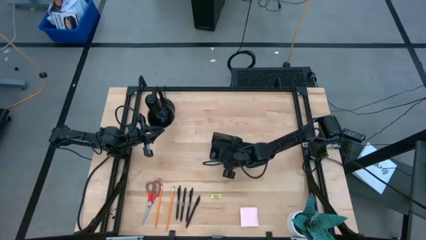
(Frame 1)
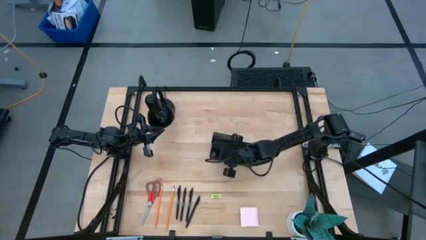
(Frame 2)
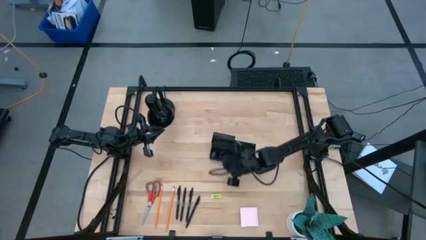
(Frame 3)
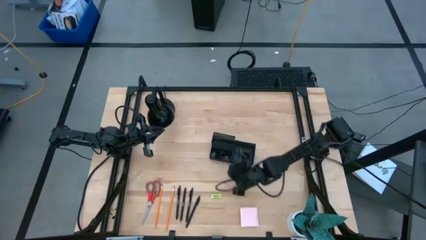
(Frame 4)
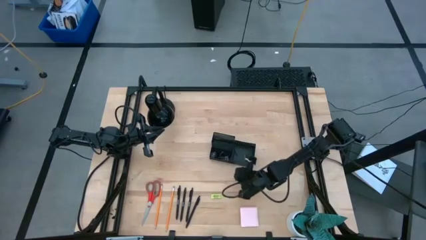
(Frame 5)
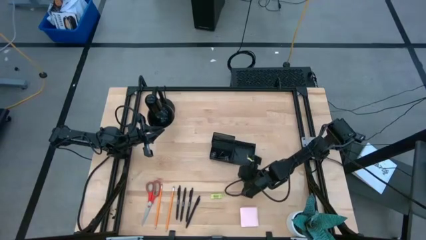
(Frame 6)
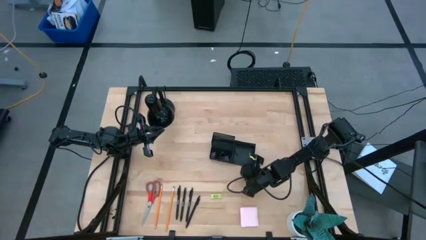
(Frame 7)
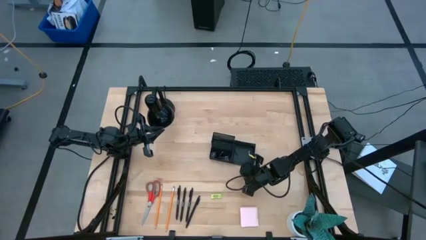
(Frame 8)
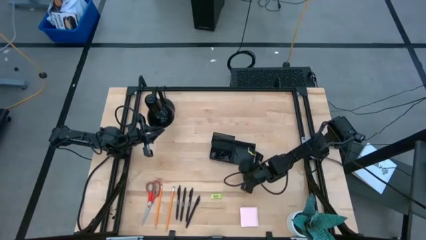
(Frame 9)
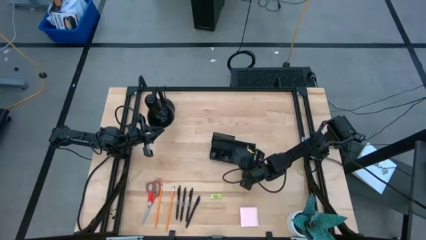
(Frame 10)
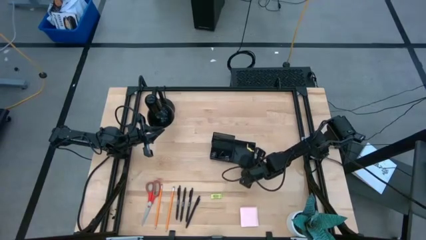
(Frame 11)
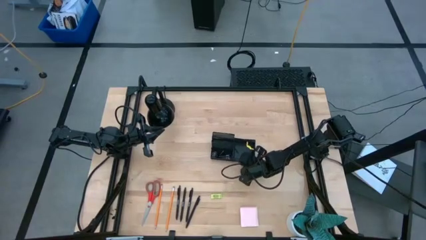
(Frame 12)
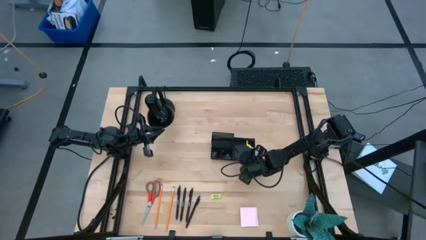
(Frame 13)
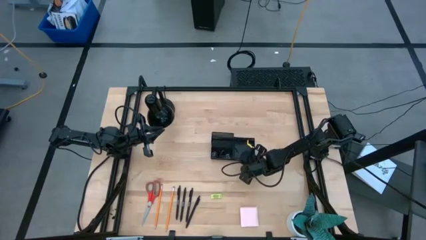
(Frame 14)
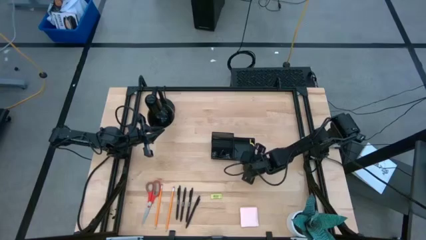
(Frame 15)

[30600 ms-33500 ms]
Task: Pick and place office supplies into organizer
Adjust the black desk organizer

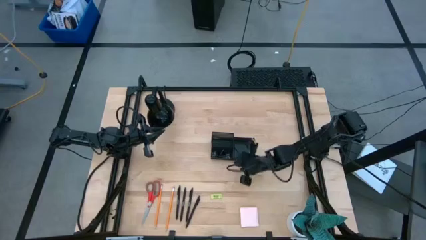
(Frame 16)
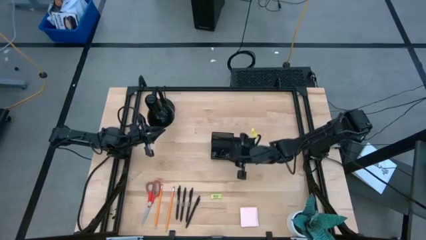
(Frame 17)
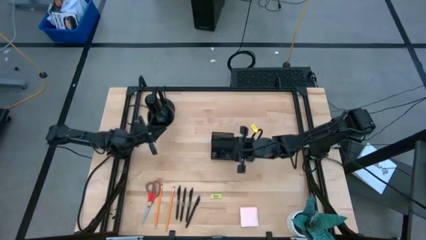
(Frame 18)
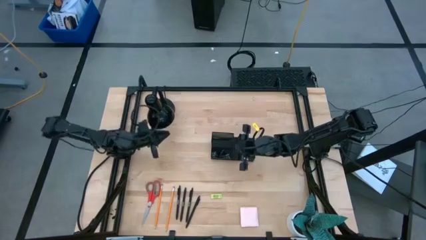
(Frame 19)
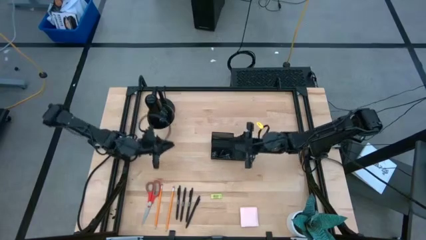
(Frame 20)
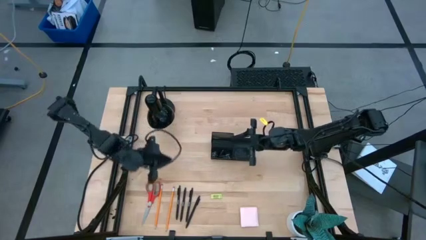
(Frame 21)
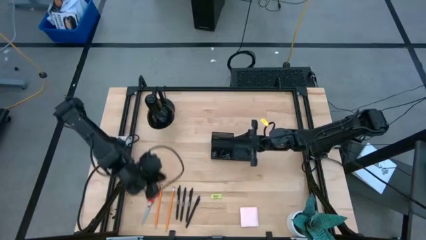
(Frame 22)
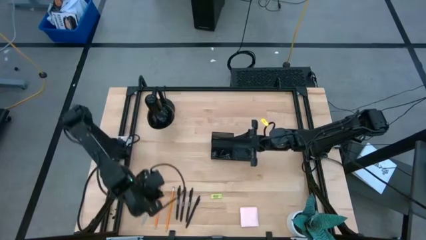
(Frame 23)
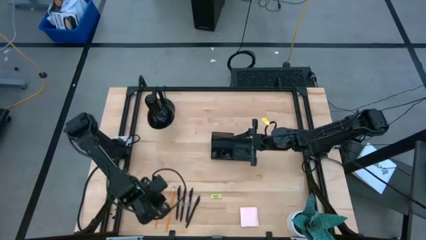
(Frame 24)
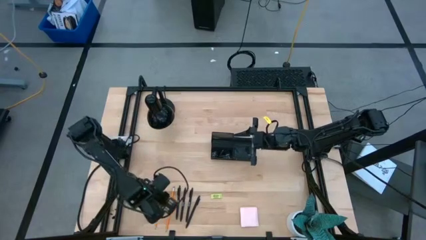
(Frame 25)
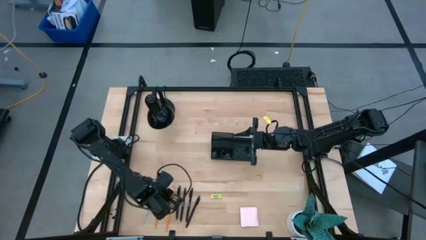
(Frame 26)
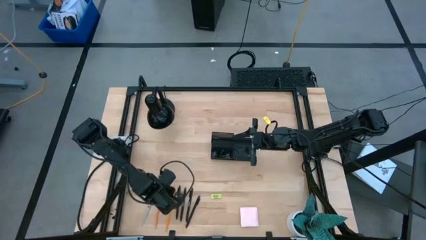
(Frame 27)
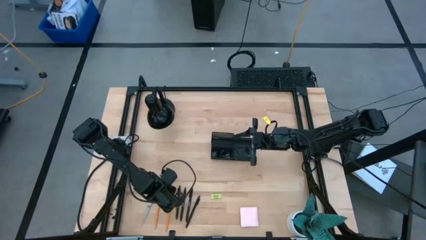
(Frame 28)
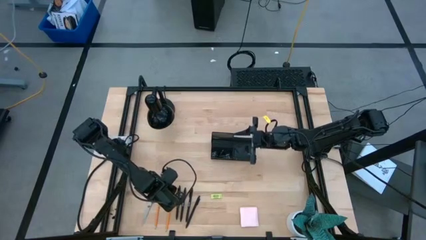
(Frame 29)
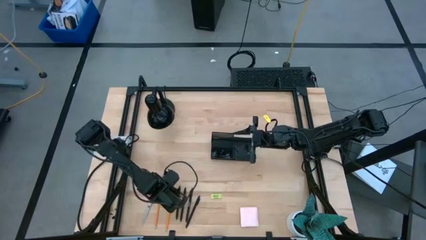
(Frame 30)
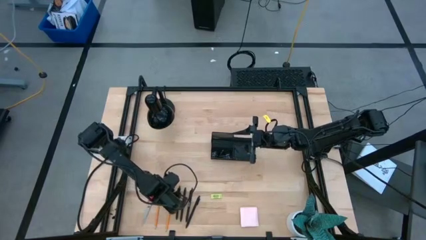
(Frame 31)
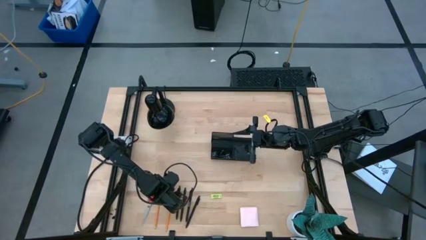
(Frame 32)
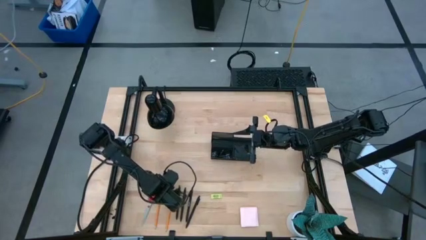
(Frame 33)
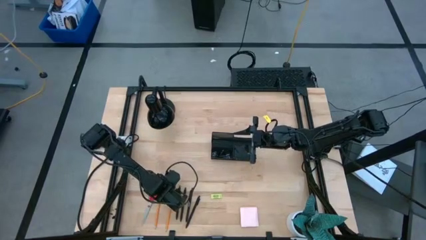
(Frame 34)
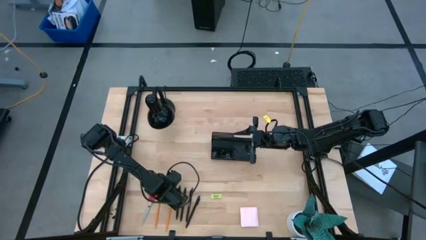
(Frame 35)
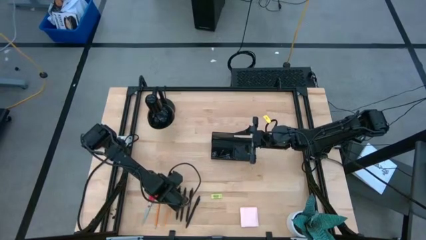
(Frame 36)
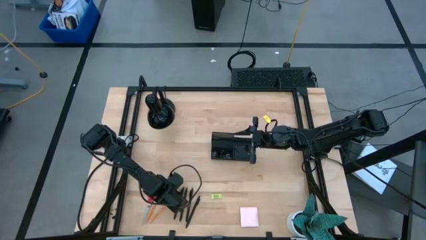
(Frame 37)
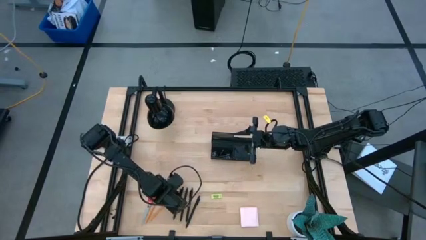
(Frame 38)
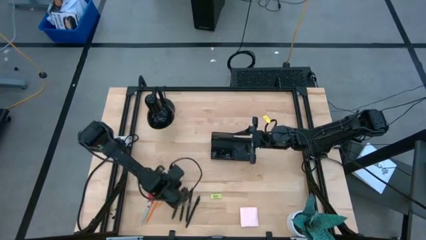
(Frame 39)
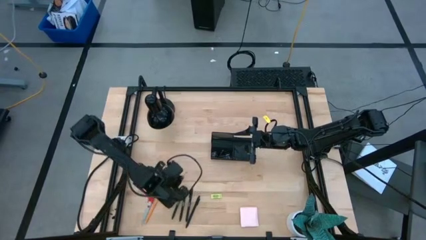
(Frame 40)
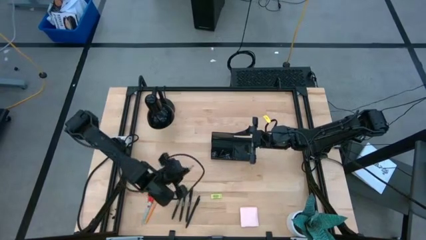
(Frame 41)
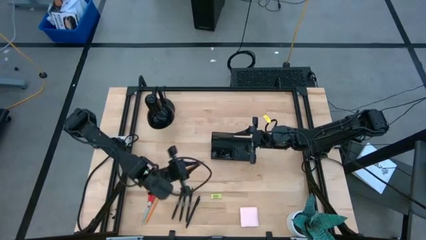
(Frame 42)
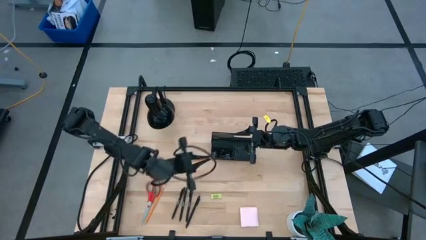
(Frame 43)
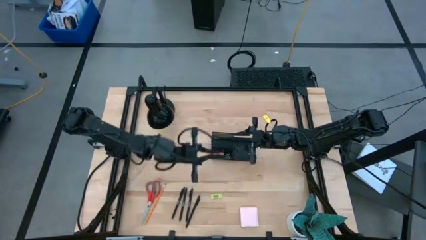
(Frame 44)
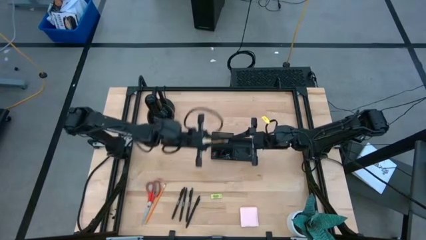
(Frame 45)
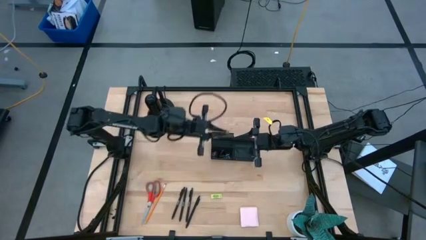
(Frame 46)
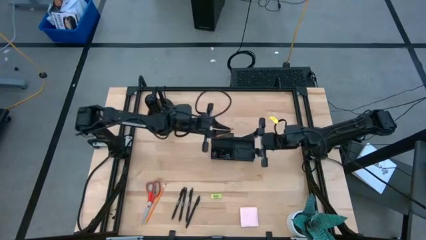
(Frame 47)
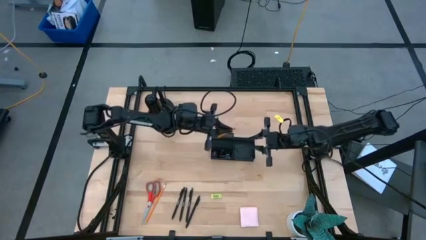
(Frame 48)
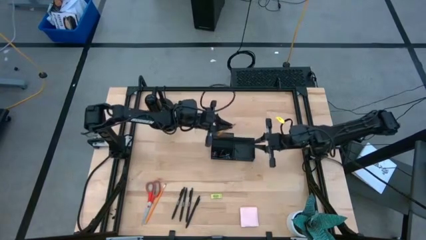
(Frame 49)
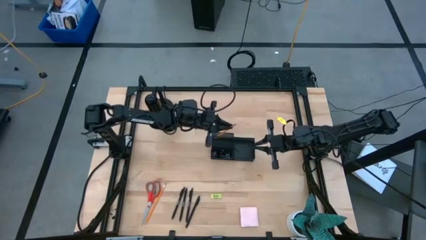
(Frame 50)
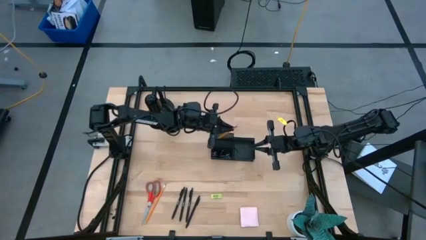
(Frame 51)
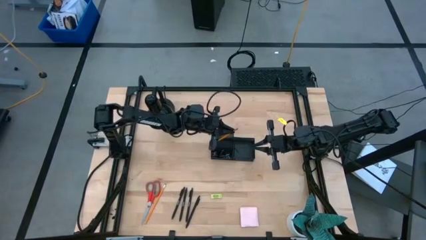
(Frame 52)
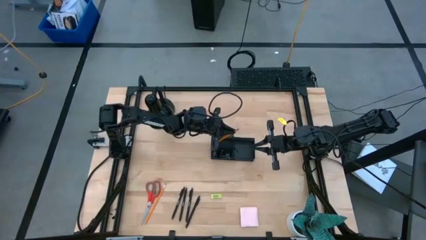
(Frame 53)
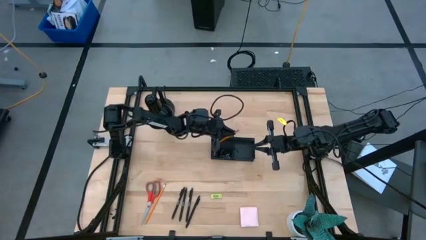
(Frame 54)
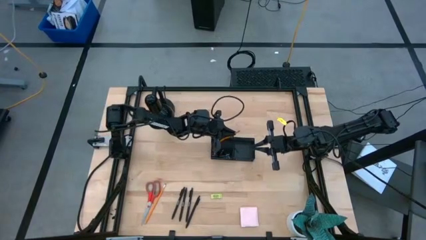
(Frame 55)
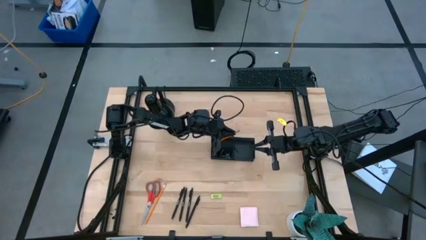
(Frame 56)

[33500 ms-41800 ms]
Put the yellow pencil into the black desk organizer

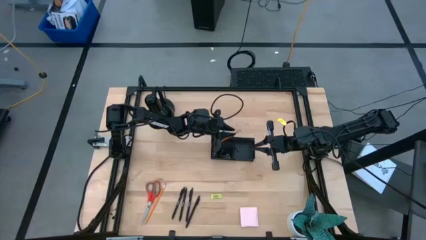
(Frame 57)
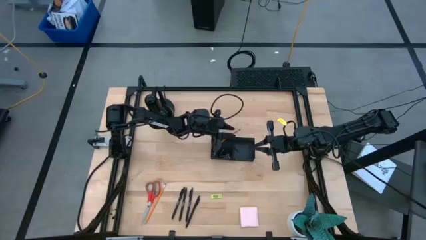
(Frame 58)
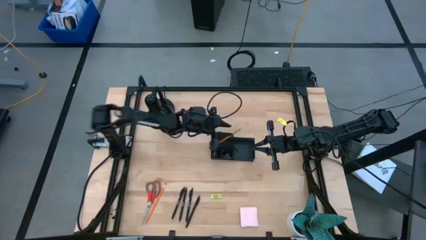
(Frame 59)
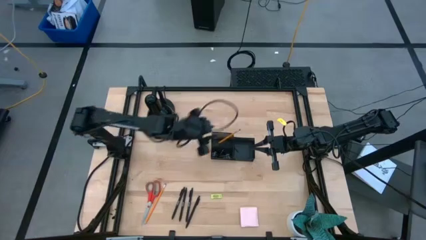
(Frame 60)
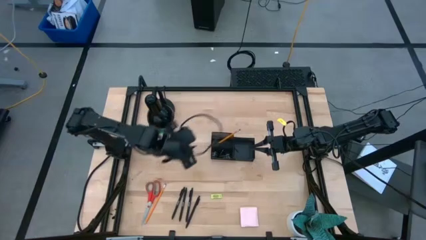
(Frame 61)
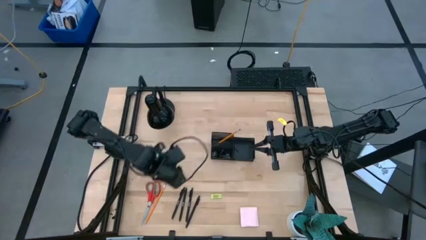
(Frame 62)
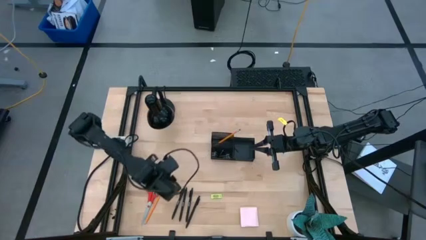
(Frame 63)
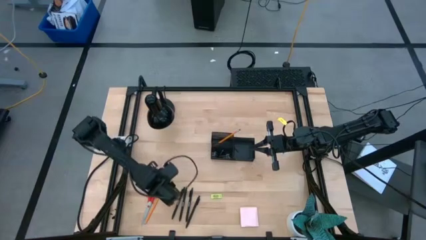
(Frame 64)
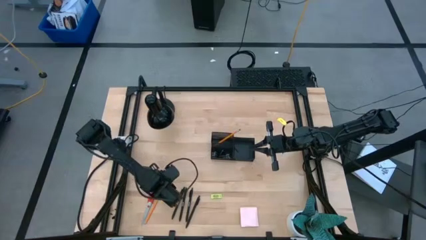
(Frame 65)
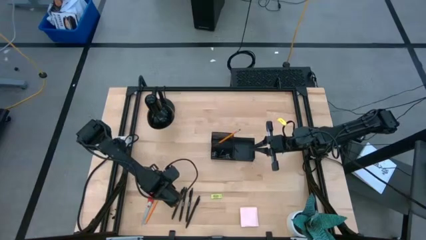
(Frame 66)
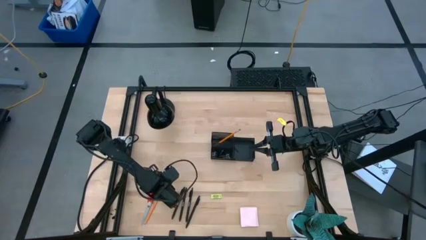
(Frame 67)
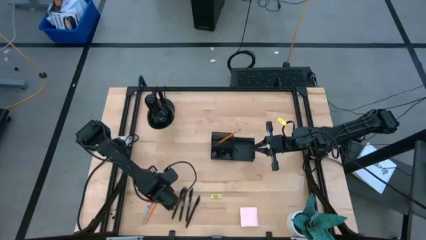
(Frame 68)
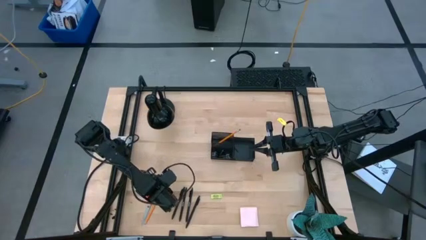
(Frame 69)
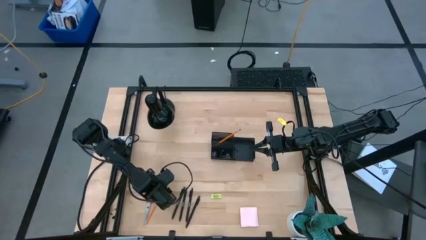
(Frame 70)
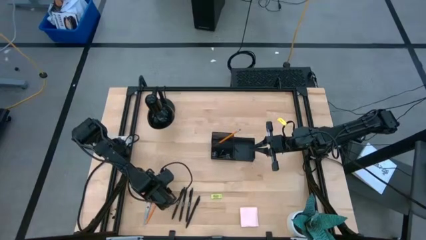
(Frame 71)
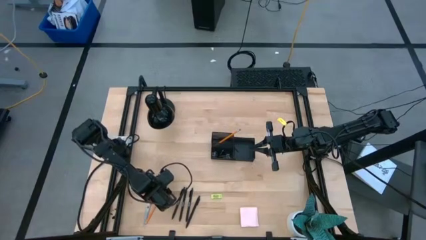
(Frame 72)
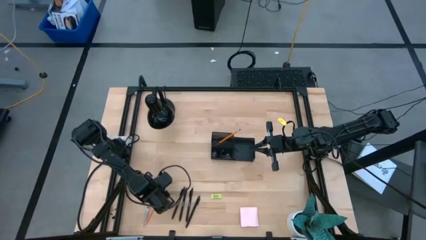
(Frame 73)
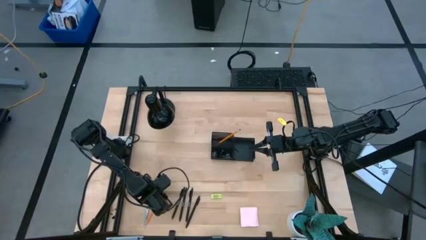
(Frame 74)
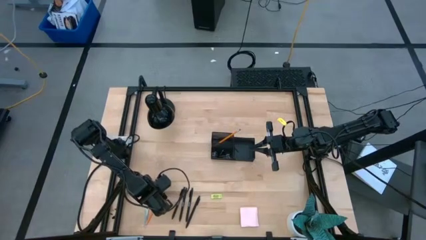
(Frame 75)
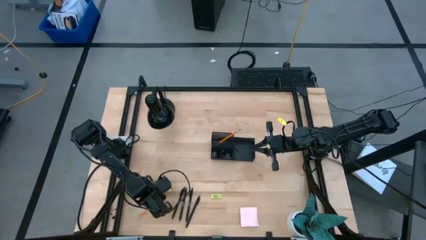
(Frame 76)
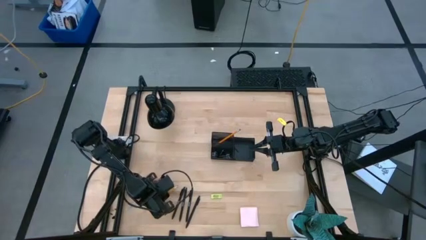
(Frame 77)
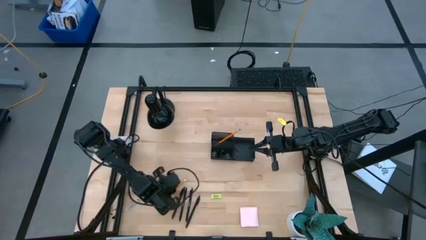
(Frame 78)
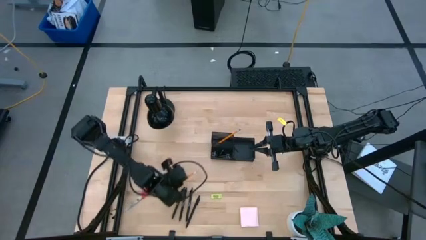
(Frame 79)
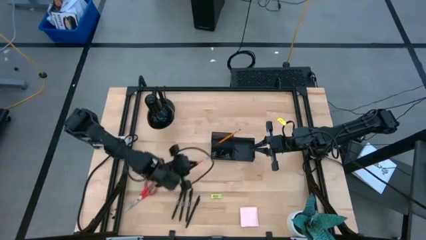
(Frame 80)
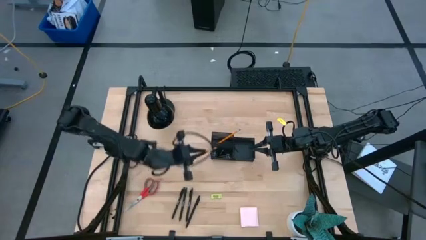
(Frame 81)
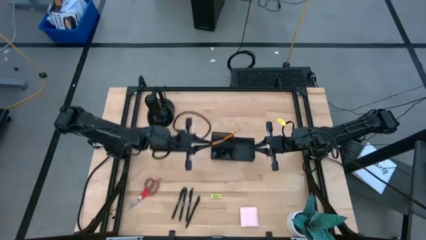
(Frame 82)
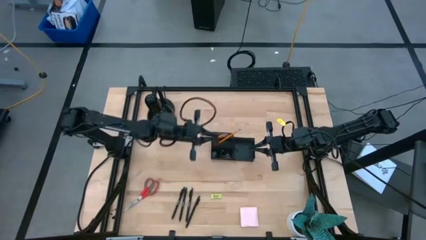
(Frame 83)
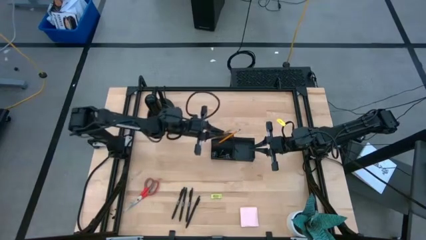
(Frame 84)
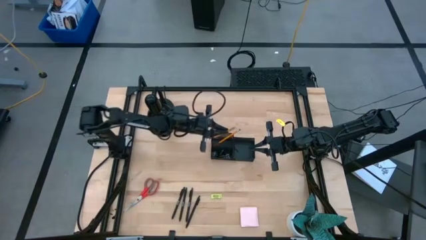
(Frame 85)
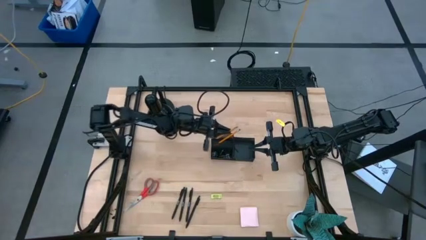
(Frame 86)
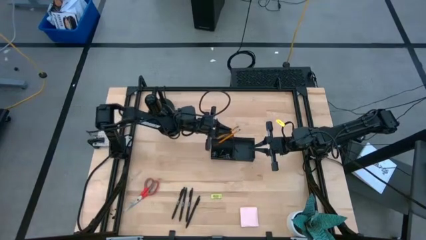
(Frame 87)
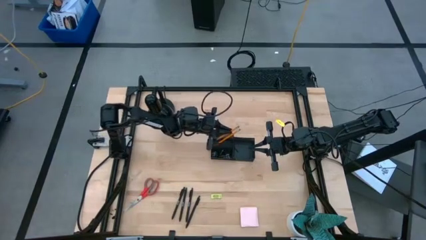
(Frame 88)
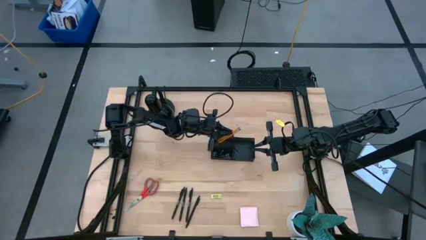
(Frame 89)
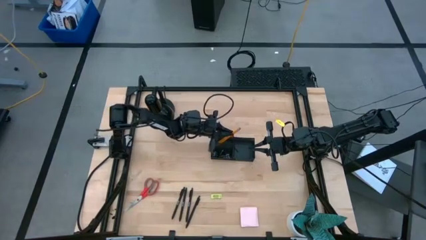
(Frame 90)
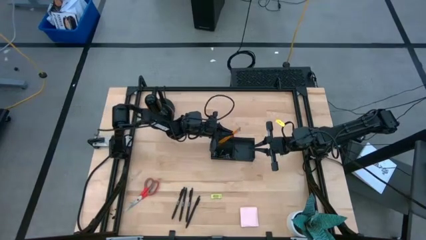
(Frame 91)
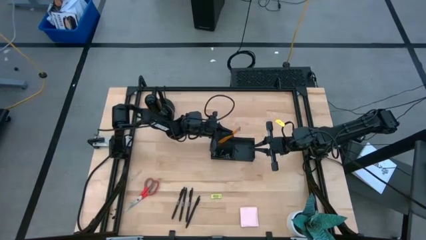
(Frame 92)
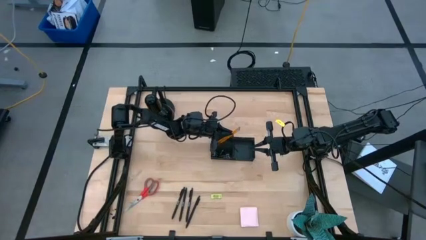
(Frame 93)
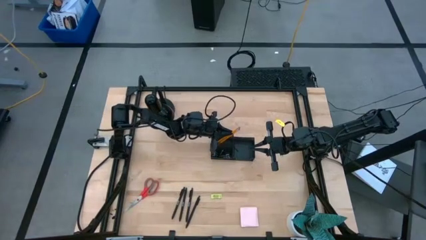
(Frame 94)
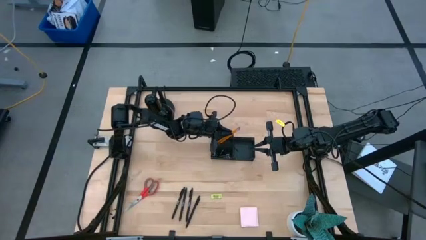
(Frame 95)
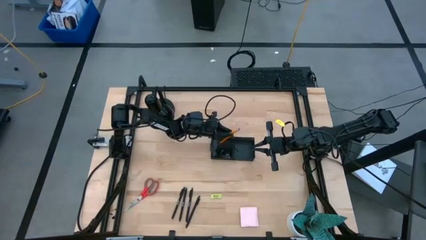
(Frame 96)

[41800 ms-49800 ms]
Put the yellow pencil into the black desk organizer
